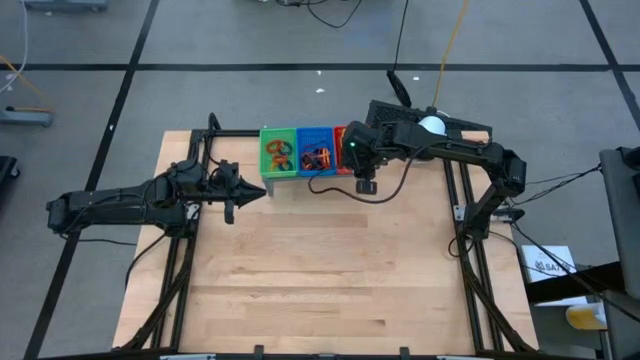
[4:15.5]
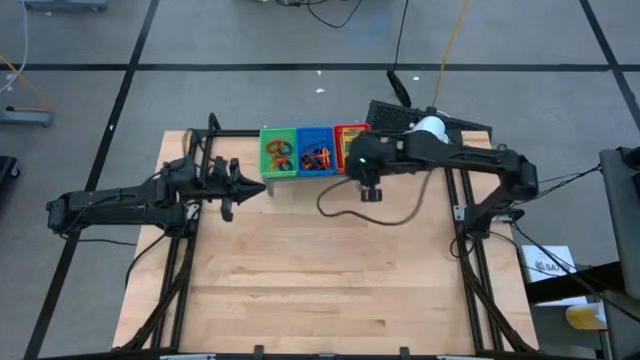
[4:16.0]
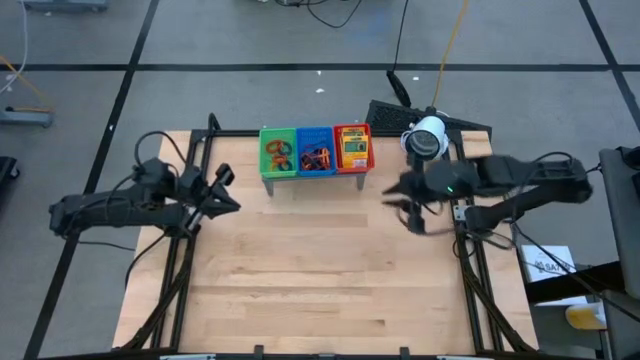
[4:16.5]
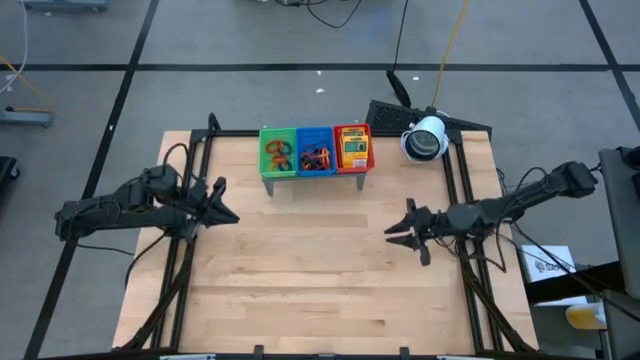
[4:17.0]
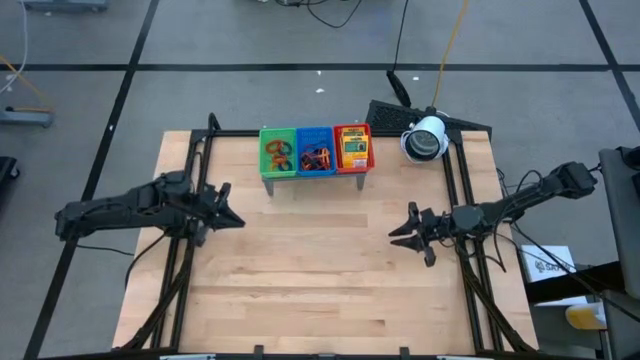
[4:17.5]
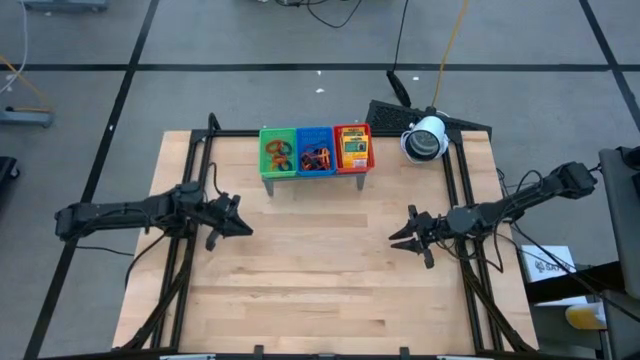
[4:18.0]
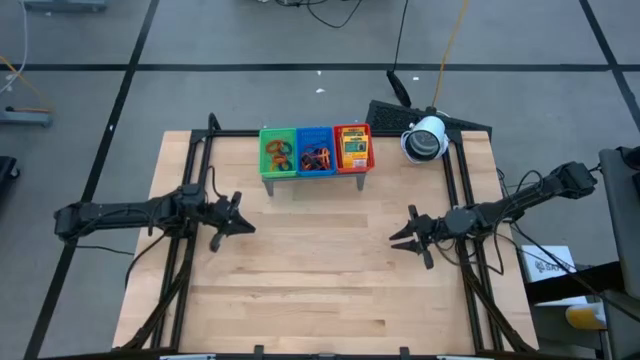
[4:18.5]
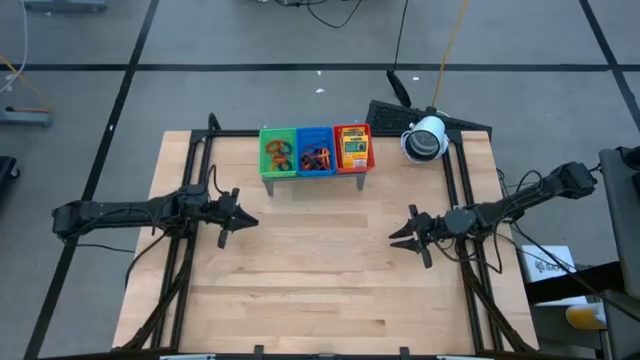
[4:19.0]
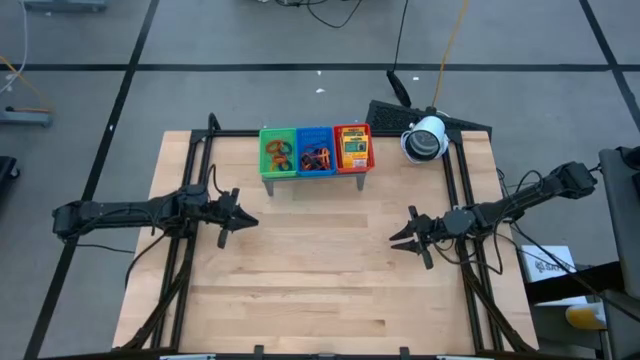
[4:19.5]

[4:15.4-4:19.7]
Task: Pick & Place Office Desk Supplies
Return to Home Position

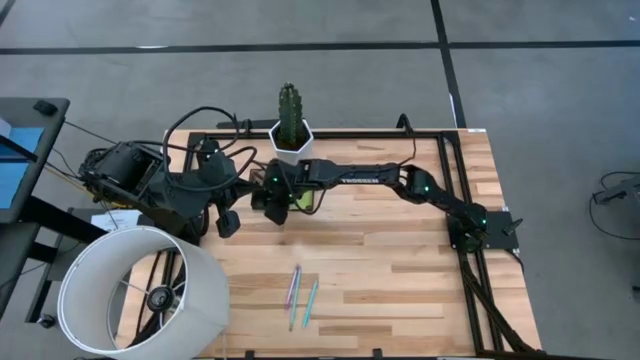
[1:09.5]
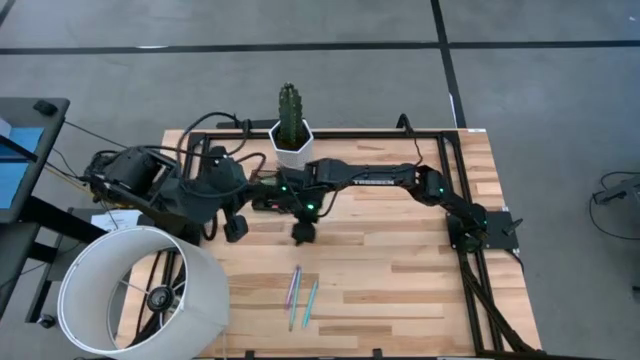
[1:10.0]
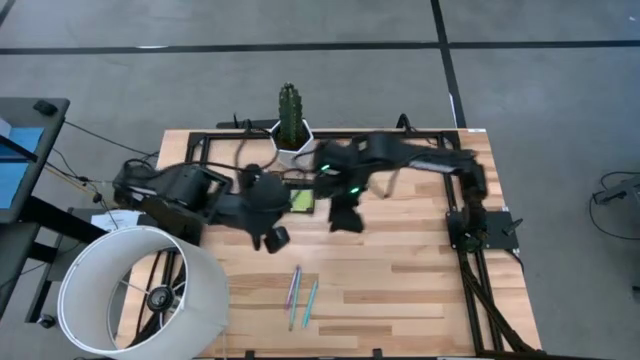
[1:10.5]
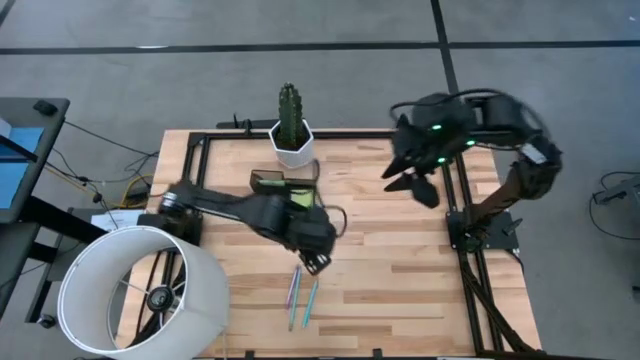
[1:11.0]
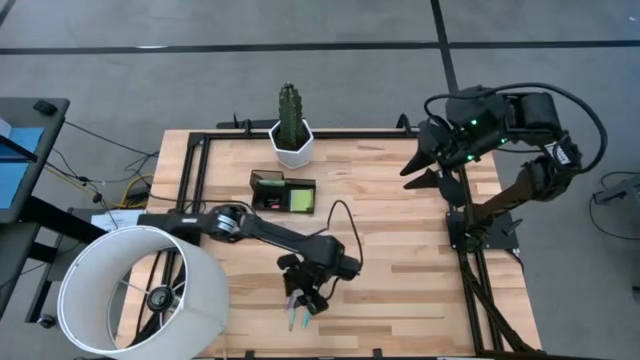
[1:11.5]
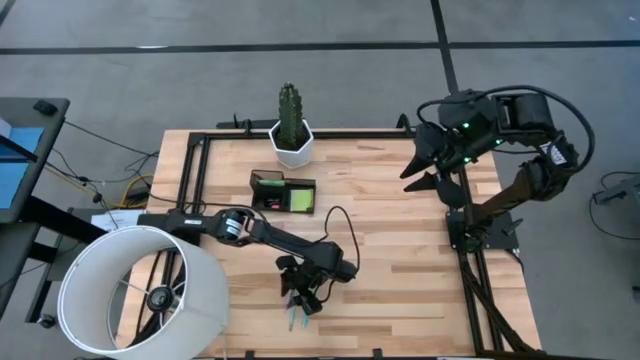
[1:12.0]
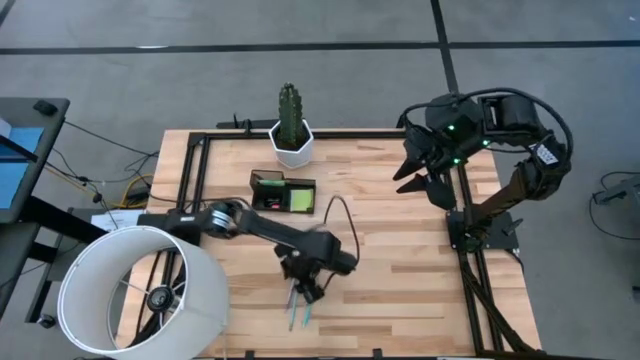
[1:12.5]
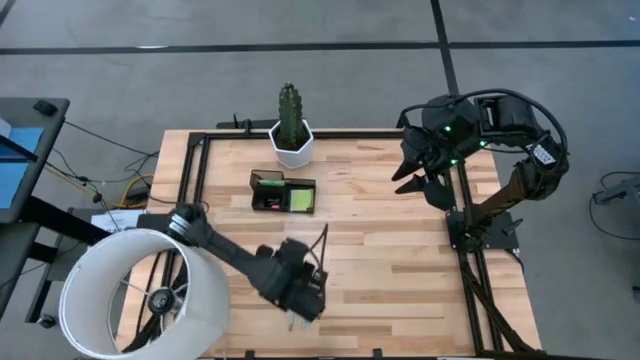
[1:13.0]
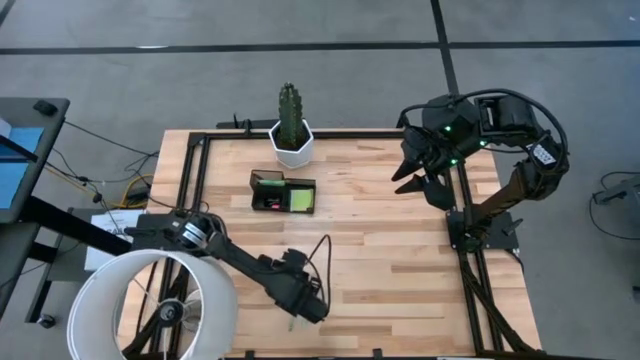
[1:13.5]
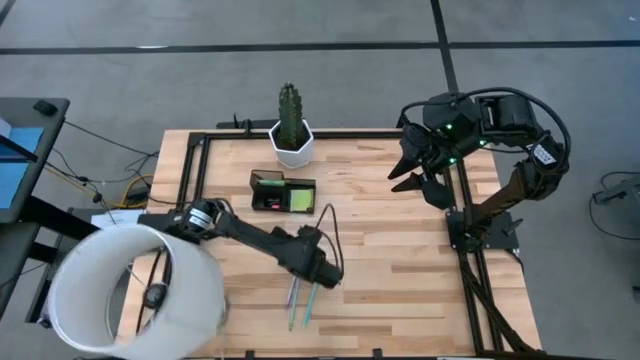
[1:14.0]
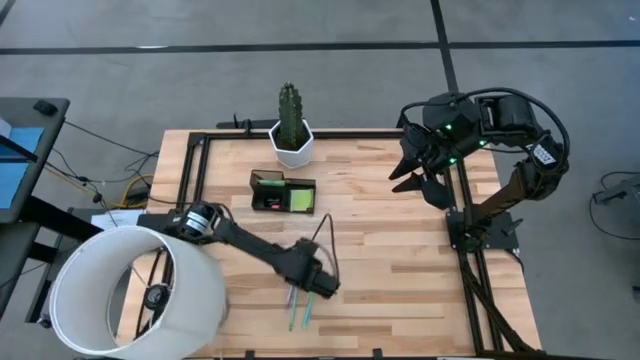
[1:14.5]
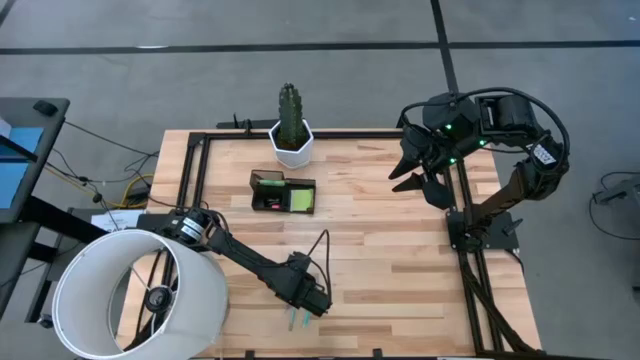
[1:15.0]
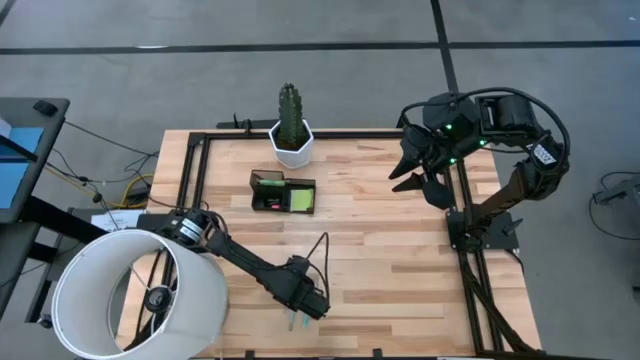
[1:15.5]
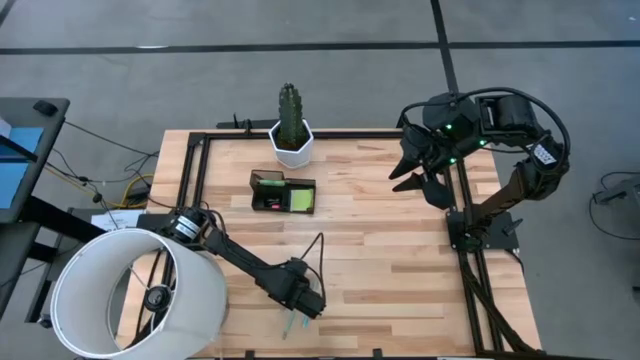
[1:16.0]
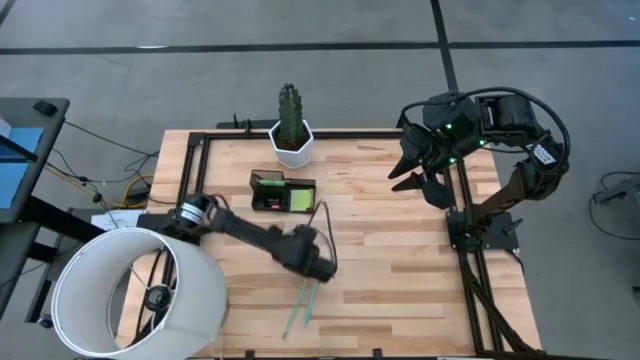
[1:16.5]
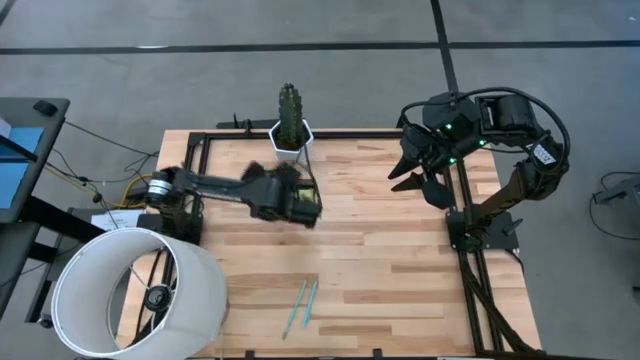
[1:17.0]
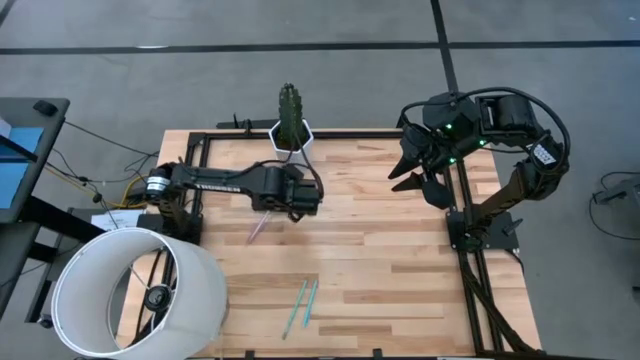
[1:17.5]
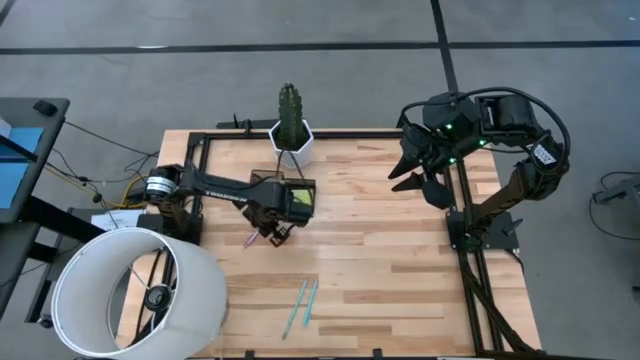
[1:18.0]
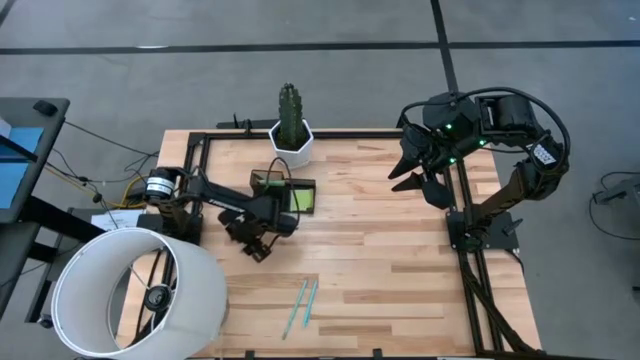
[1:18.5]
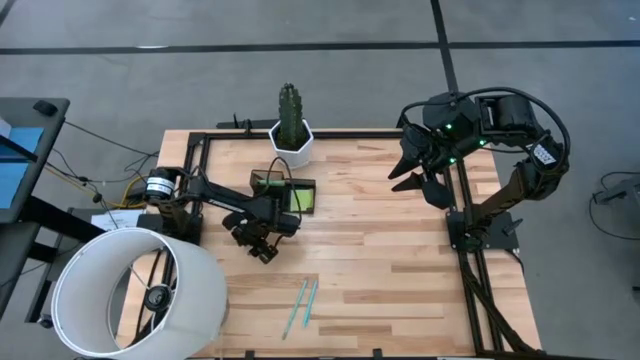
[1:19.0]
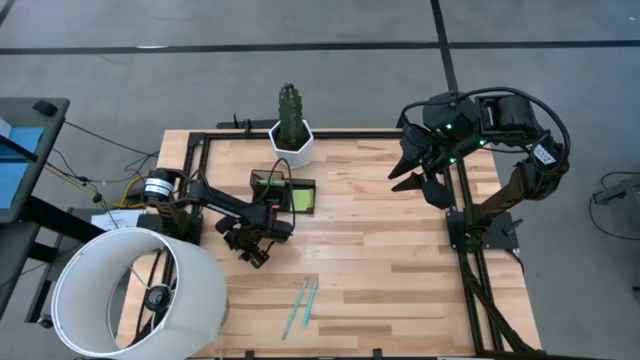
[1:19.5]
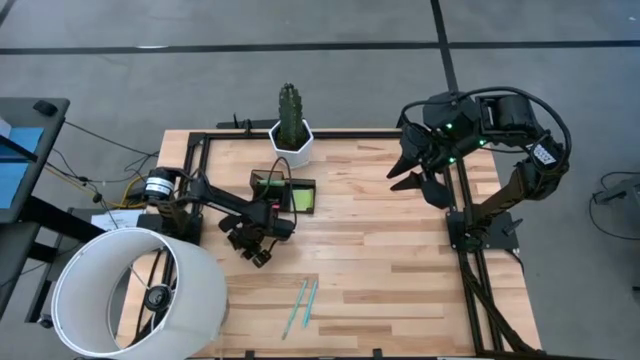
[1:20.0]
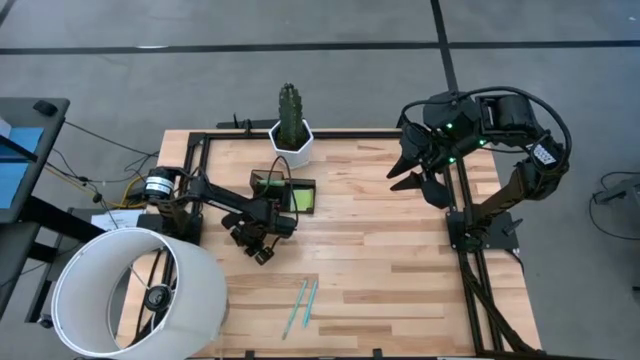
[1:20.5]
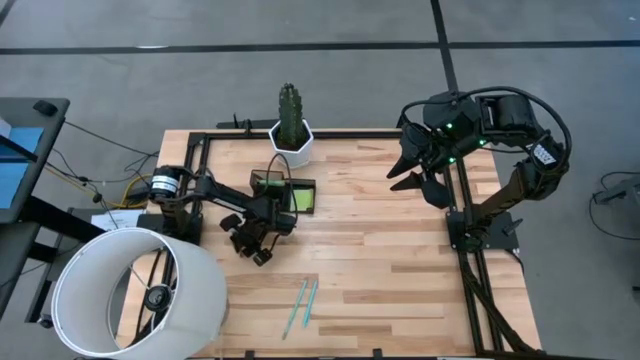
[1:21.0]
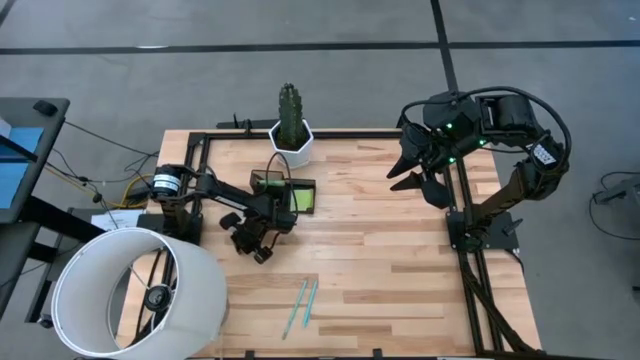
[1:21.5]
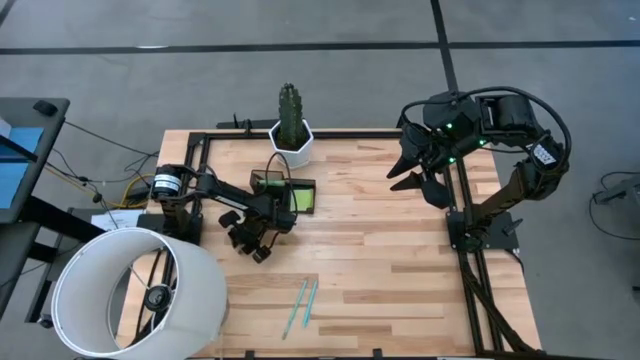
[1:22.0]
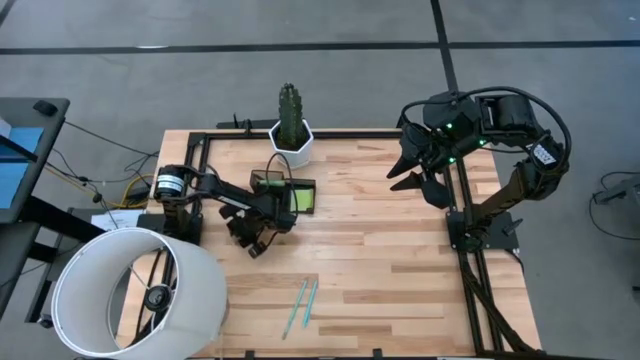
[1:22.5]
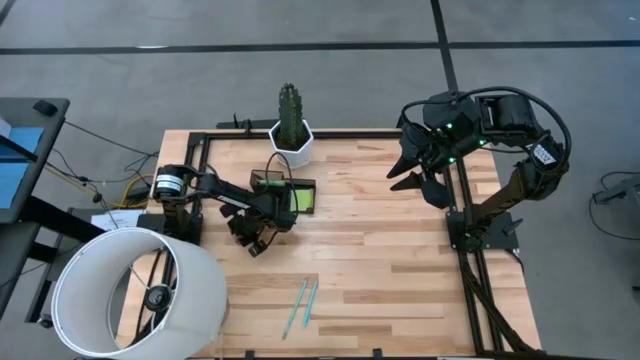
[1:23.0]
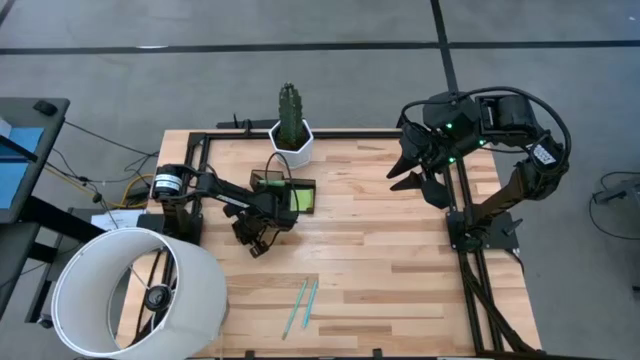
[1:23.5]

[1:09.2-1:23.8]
Task: Pick and place office supplies into organizer
Put the purple pen into the black mesh organizer

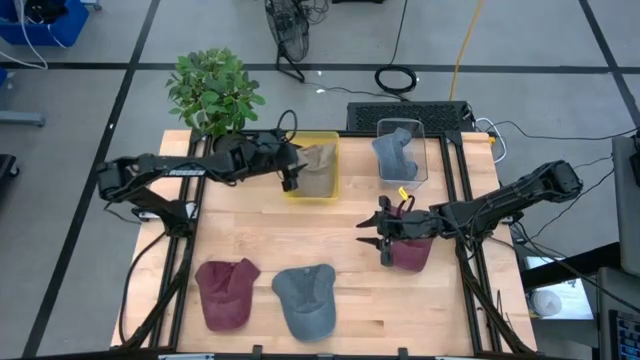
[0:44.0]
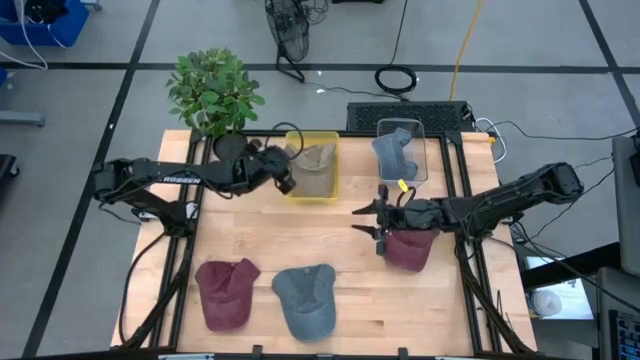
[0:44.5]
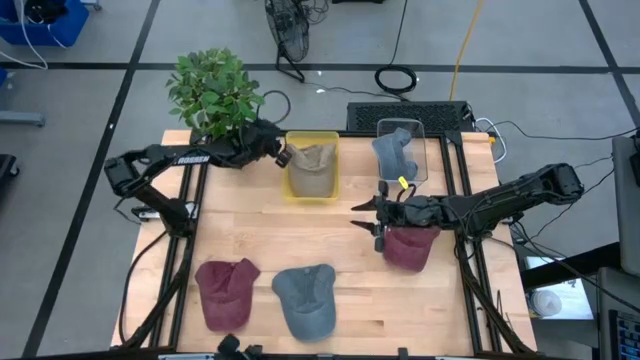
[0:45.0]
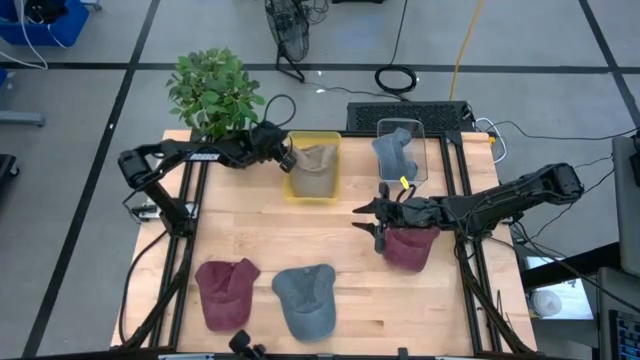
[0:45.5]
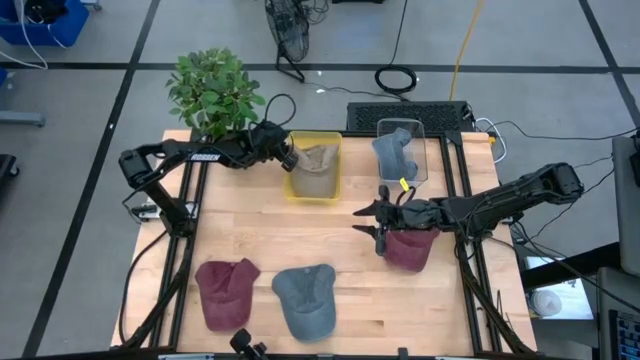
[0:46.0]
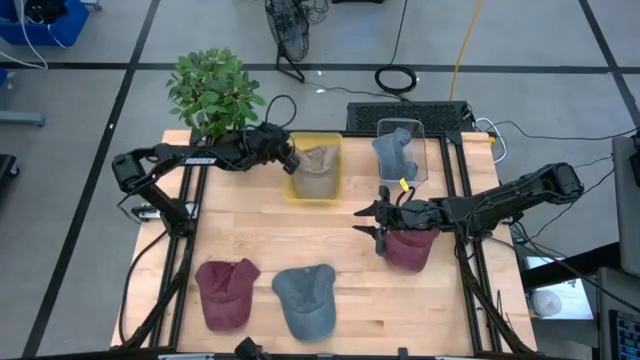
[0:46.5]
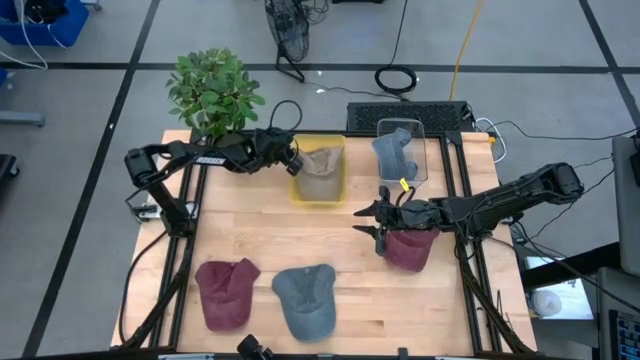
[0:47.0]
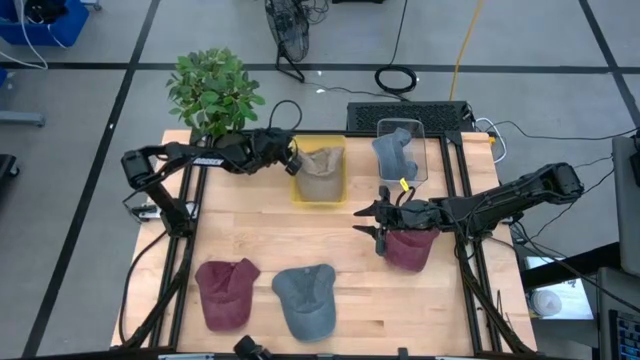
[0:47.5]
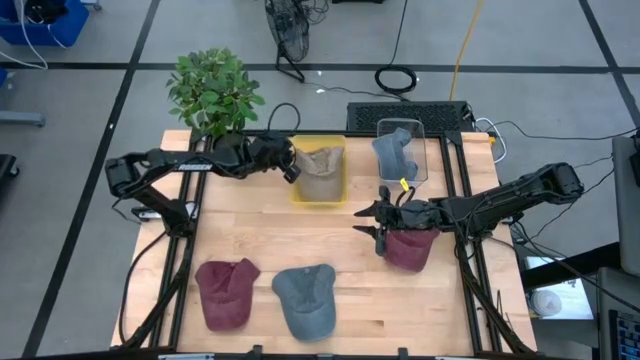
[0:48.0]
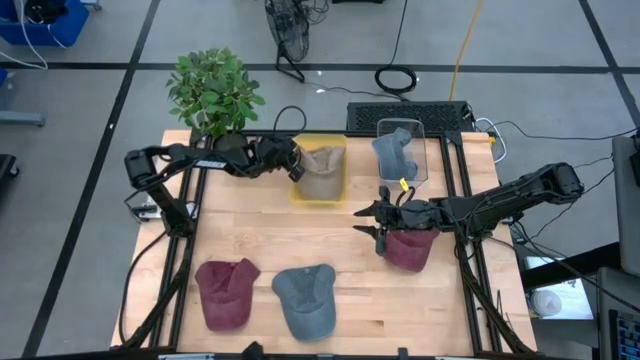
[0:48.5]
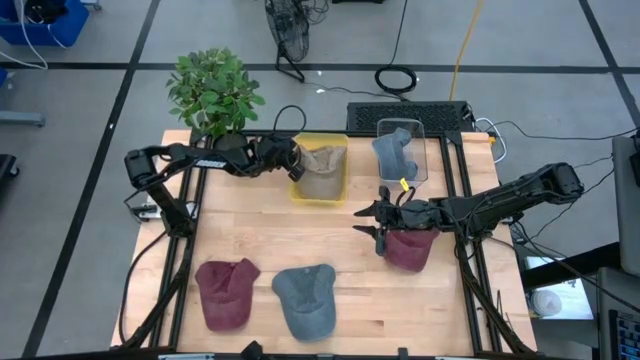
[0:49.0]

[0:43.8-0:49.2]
Task: Pick & Place hat
Adjust the yellow bin on the table
